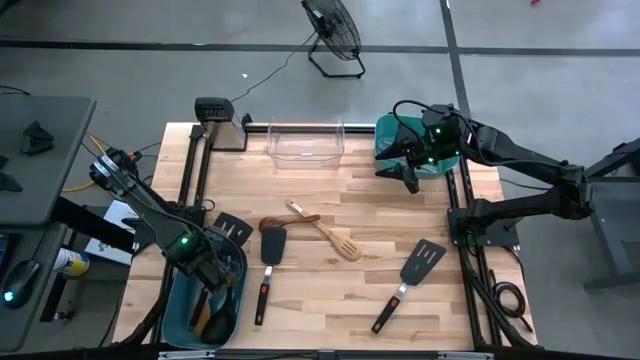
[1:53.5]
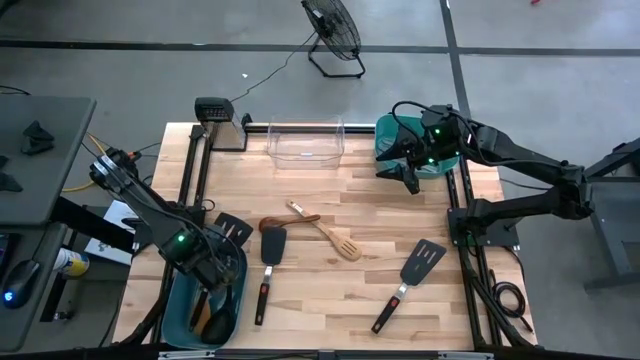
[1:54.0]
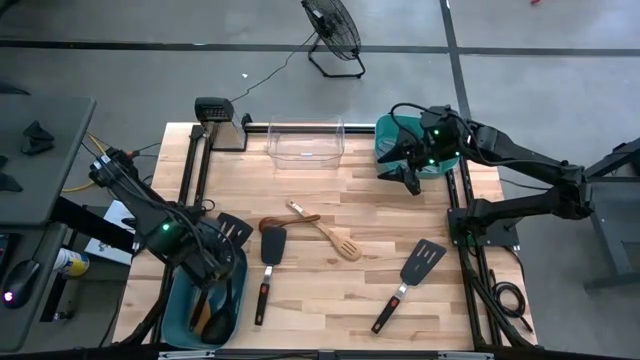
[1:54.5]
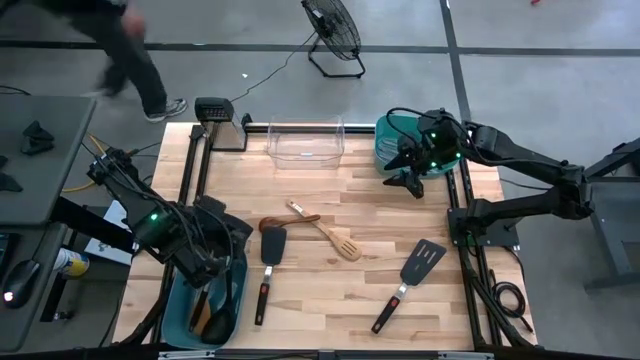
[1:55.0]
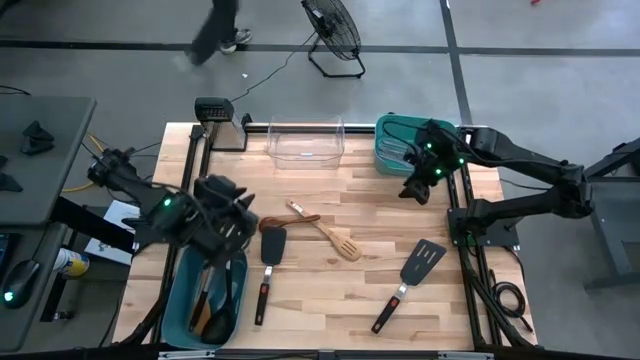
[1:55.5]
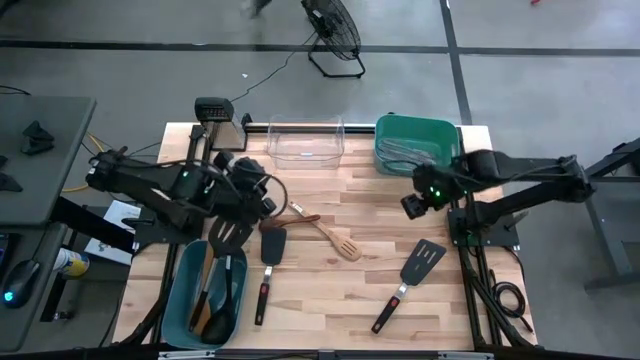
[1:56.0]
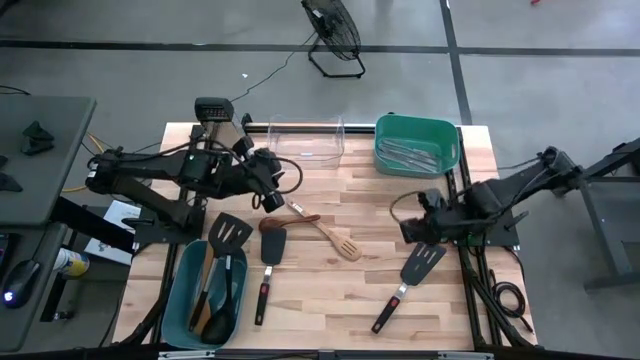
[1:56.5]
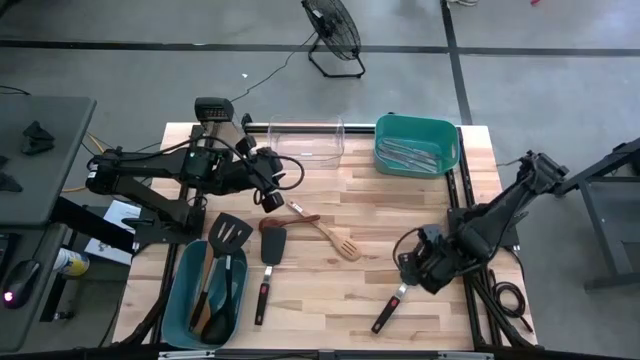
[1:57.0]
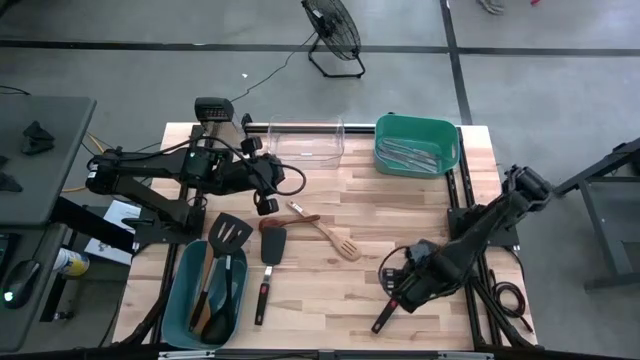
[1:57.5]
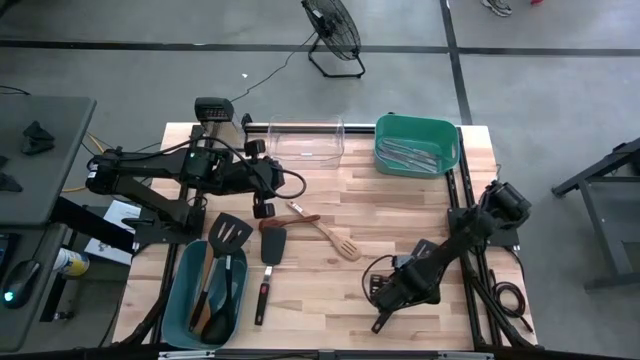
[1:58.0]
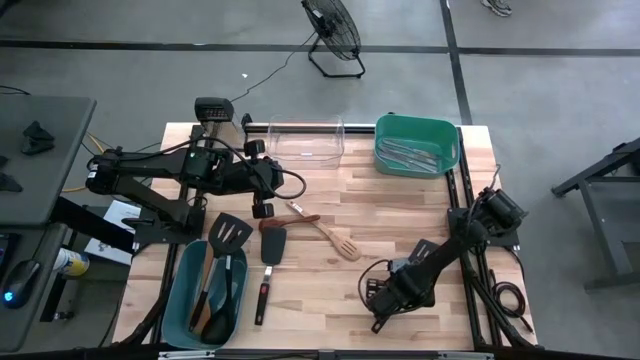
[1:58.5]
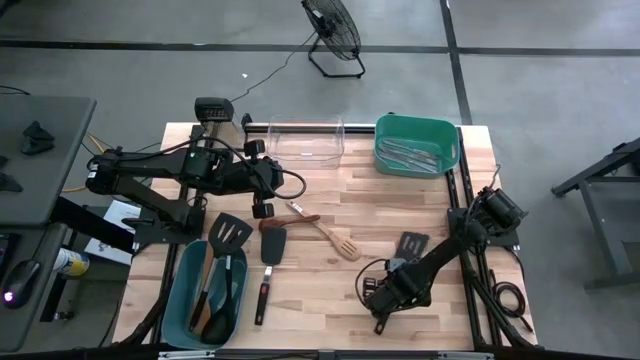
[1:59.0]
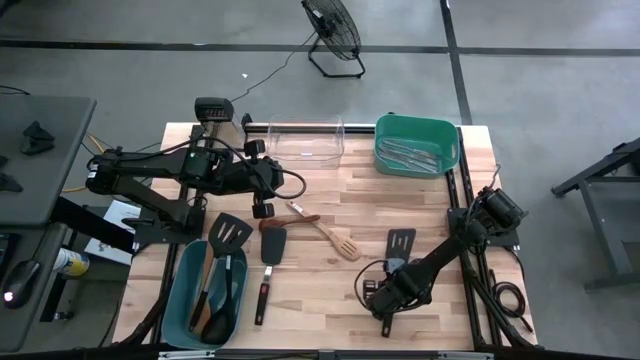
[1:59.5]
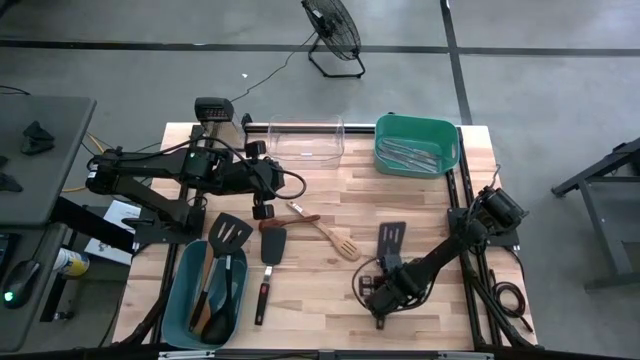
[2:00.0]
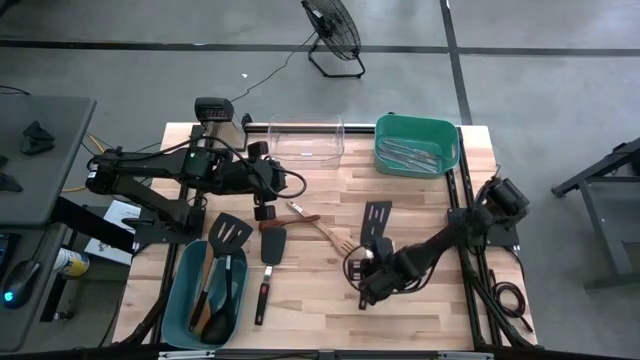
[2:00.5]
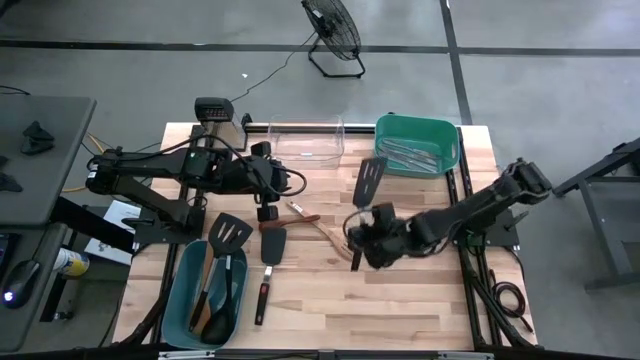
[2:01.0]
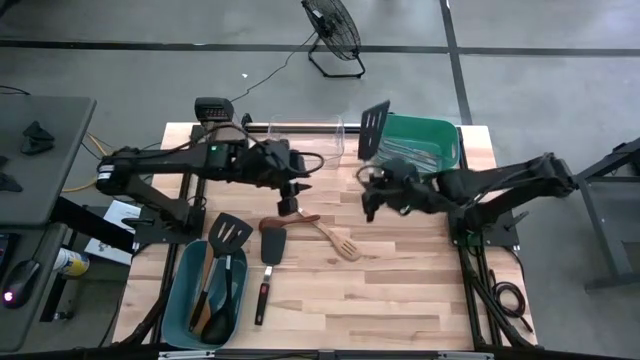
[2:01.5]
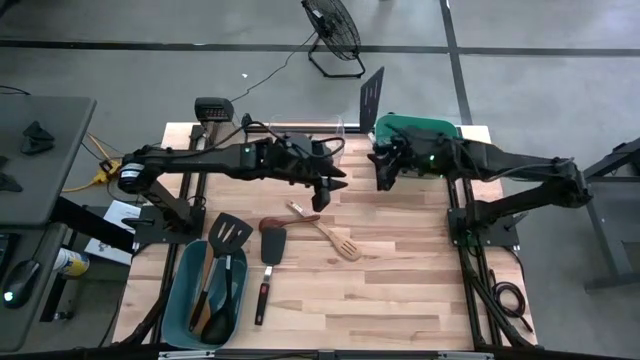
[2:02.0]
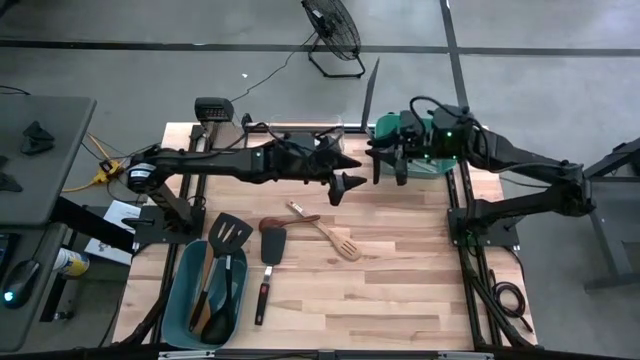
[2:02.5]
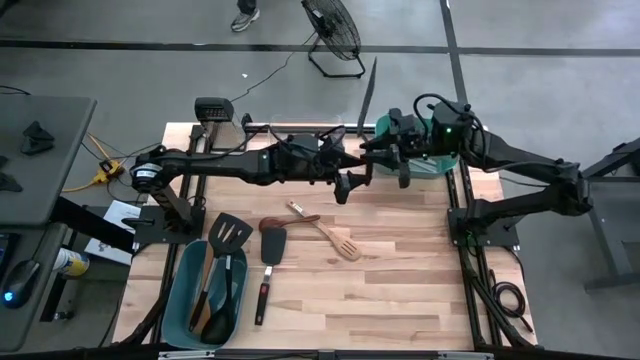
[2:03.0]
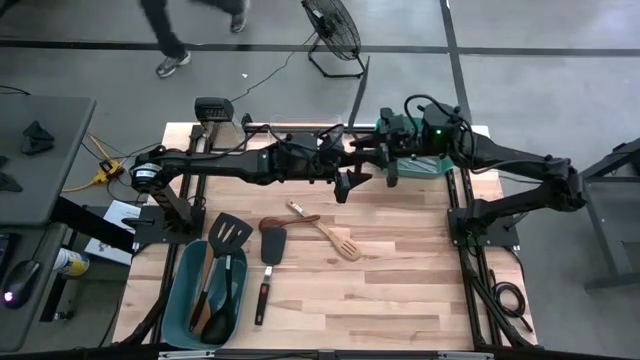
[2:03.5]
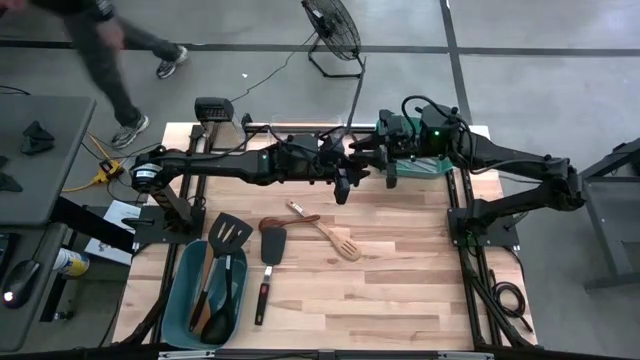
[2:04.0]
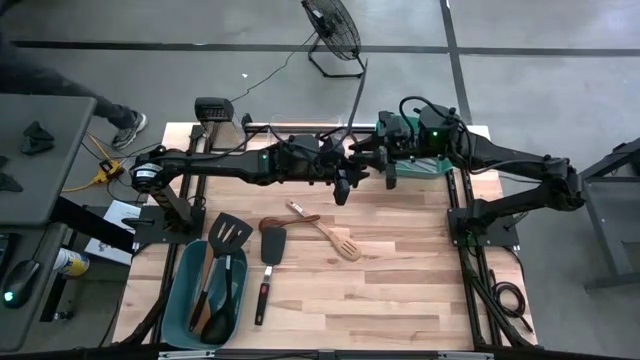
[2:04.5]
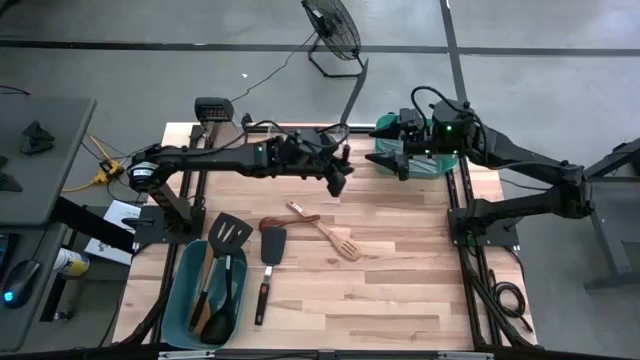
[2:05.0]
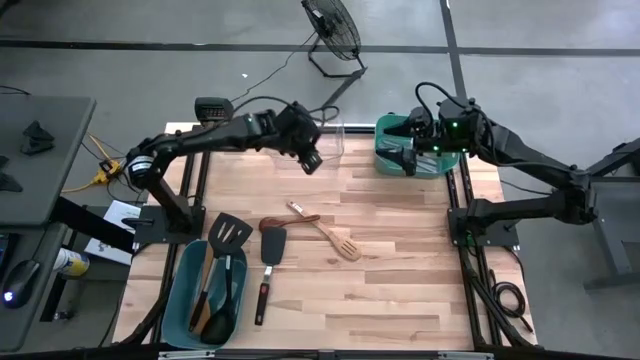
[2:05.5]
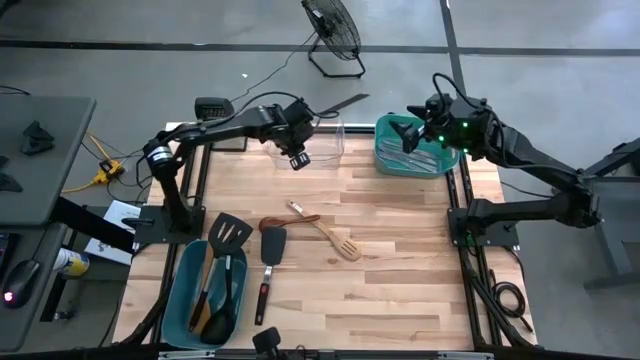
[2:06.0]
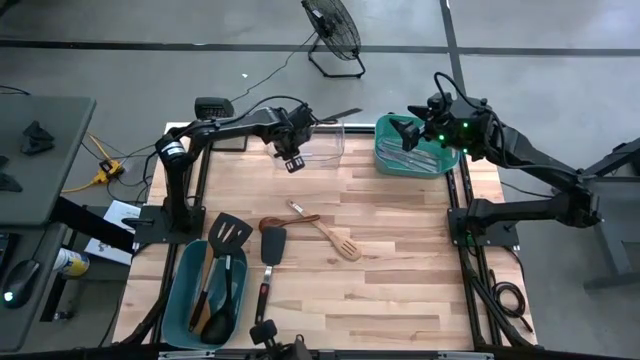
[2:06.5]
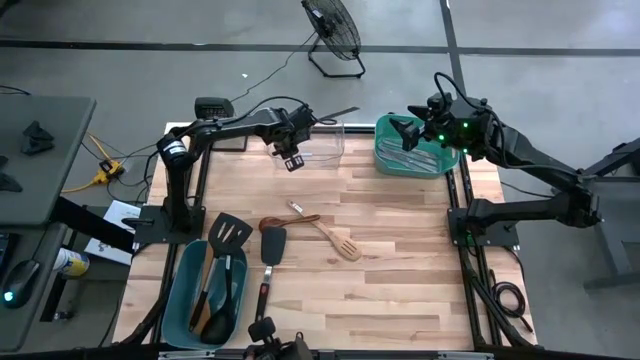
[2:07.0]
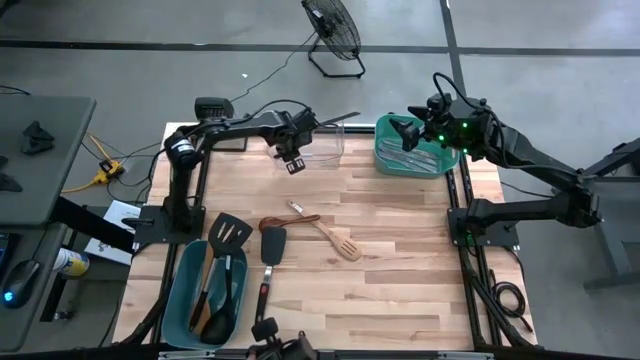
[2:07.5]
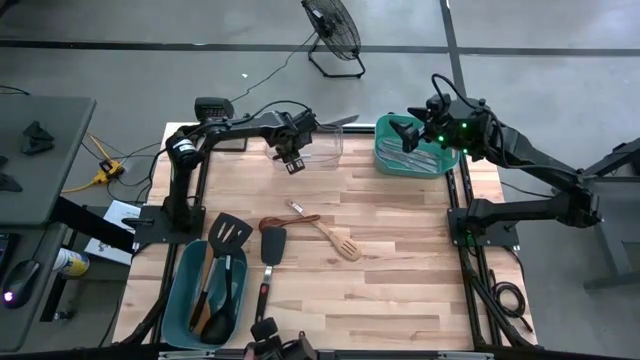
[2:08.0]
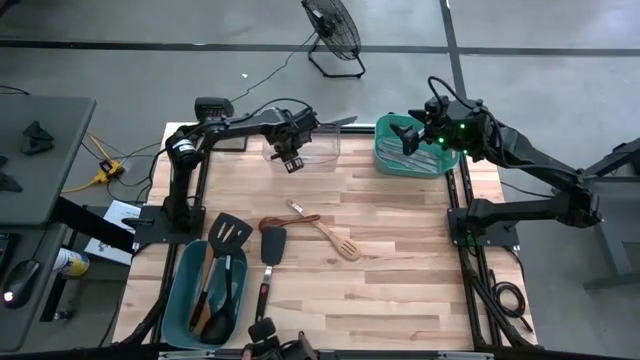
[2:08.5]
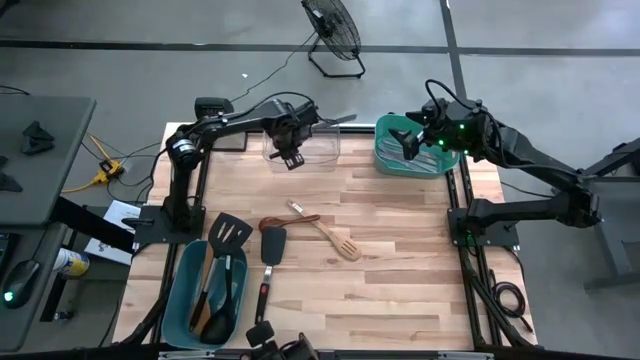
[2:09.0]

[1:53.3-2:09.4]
Task: Pick & Place Kitchen Items
Put the right spatula into the transparent bin

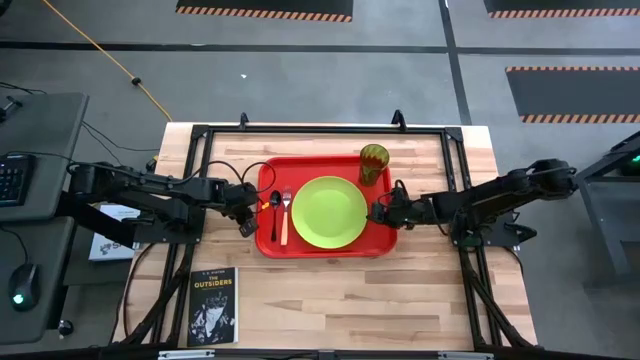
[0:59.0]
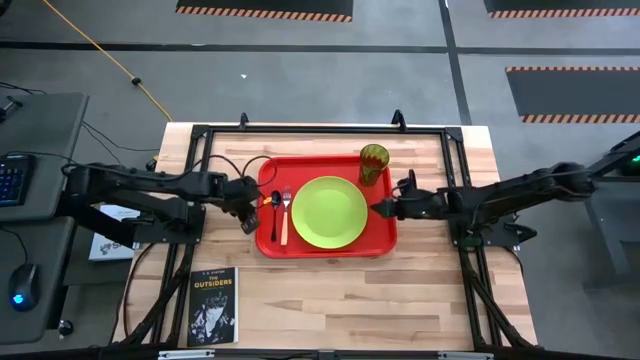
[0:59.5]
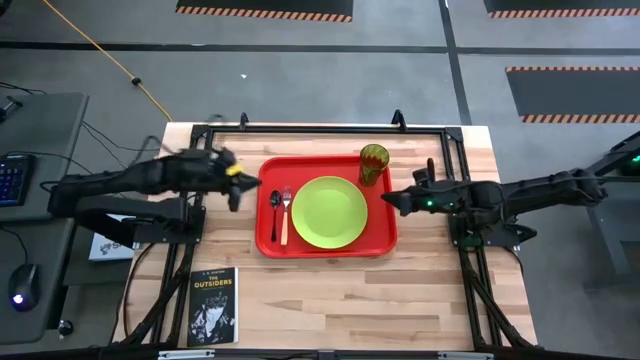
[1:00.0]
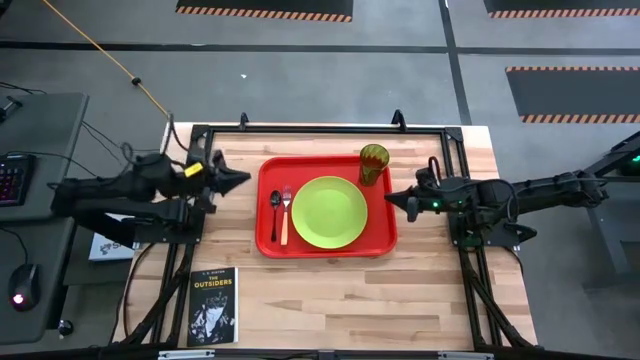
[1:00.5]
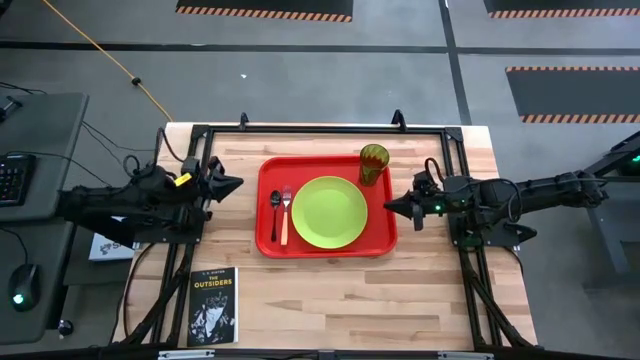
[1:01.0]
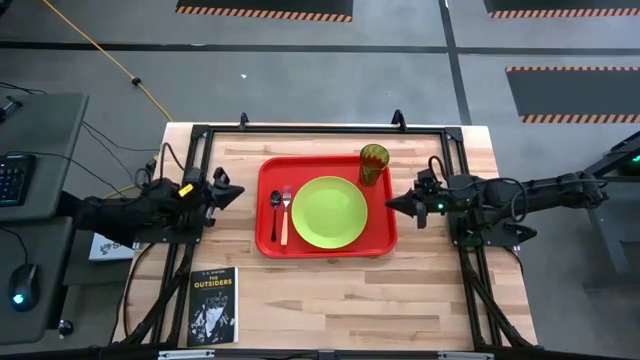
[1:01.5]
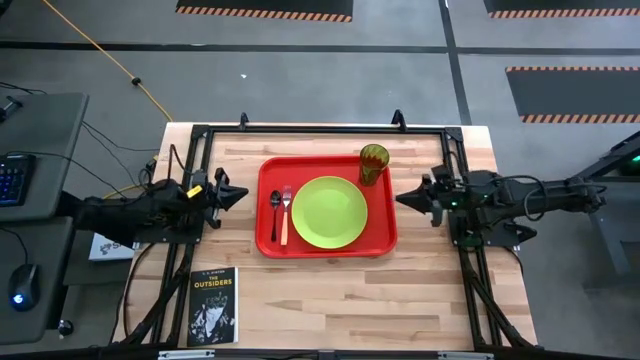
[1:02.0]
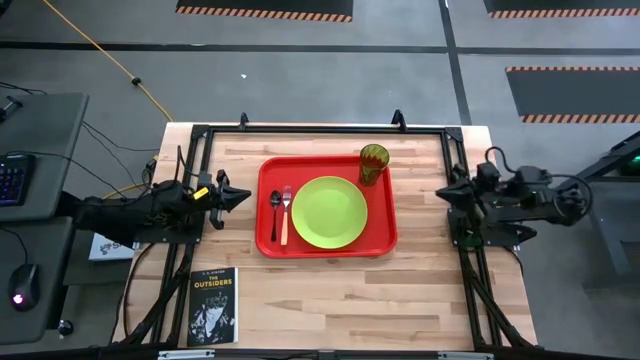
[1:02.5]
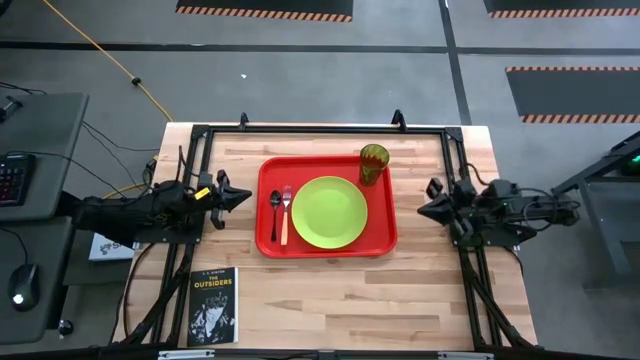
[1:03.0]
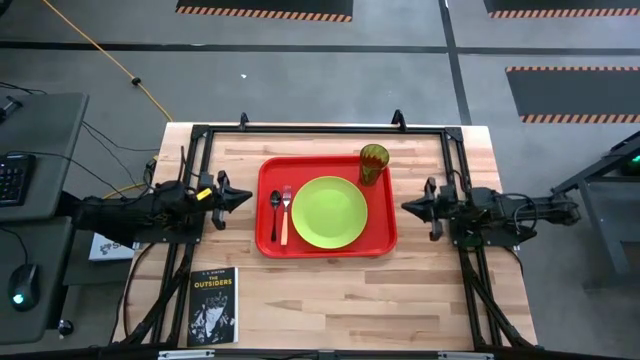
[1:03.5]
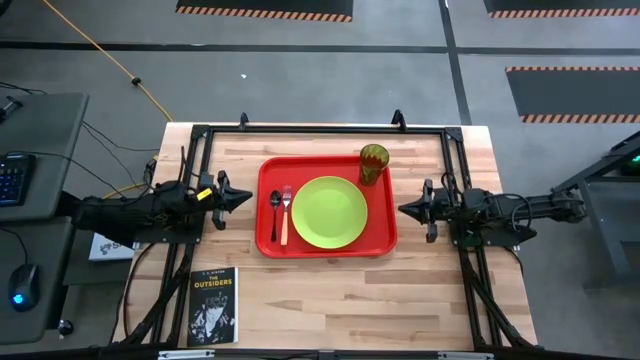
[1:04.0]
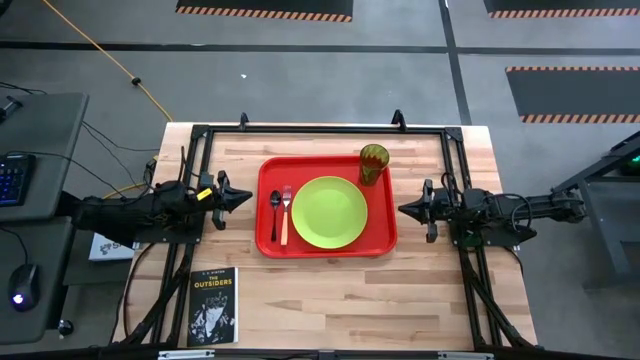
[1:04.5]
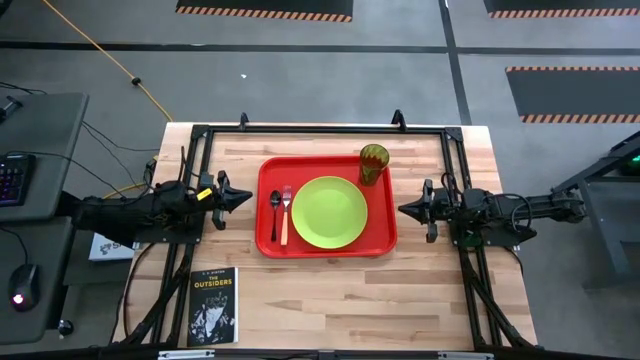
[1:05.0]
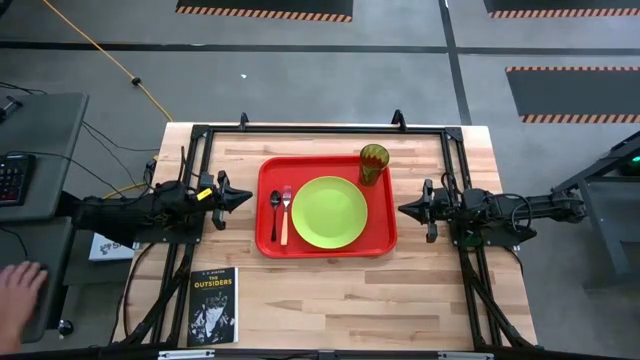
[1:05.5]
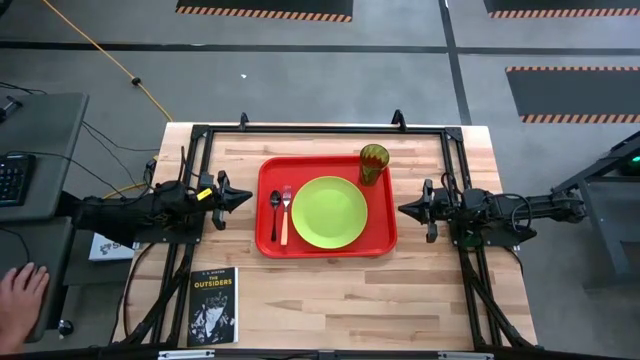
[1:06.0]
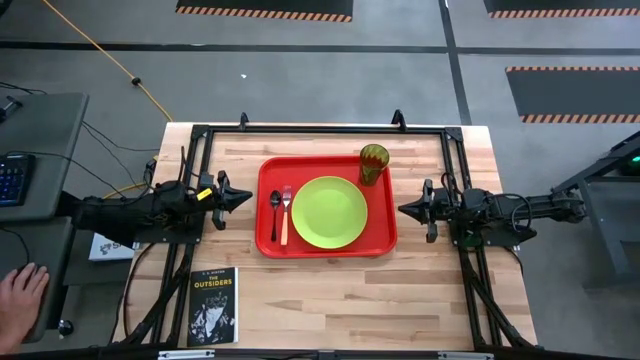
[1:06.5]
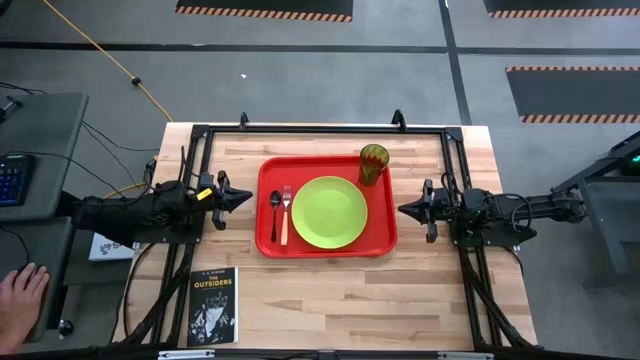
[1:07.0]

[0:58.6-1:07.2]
Task: Pick and place plate/cup/fork/spoon on tray
Return to Home Position
